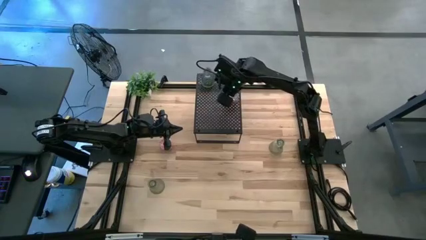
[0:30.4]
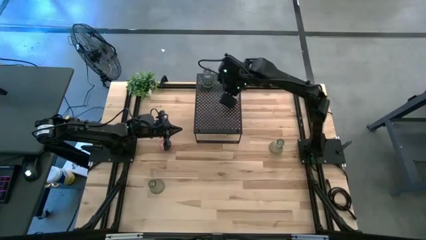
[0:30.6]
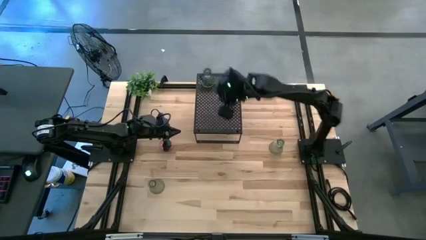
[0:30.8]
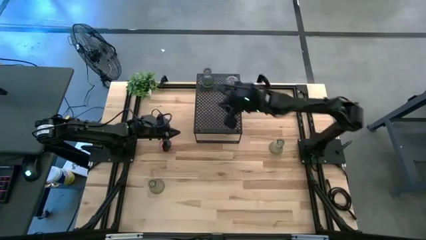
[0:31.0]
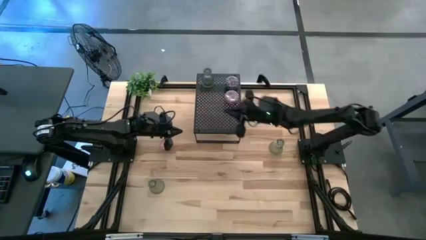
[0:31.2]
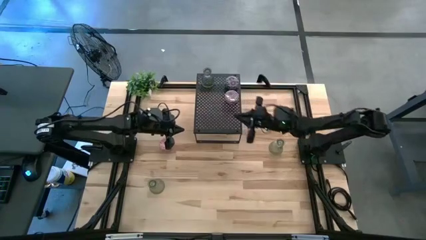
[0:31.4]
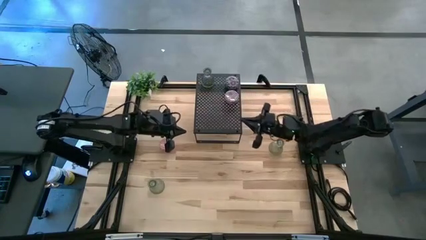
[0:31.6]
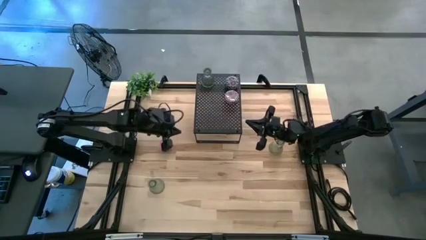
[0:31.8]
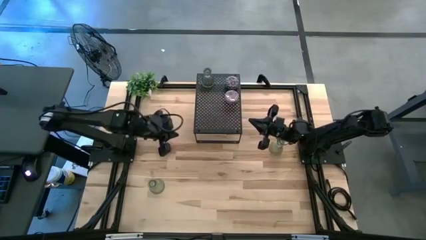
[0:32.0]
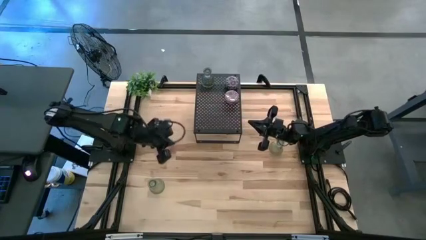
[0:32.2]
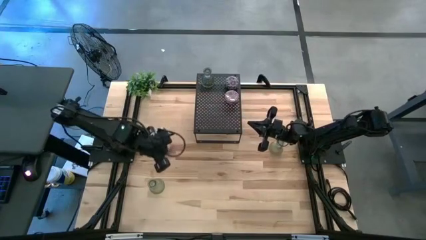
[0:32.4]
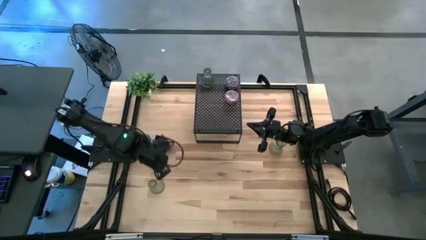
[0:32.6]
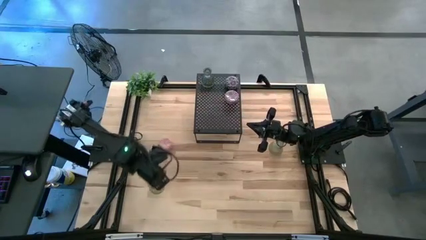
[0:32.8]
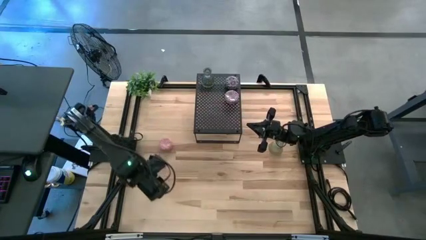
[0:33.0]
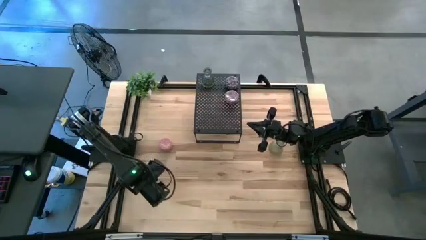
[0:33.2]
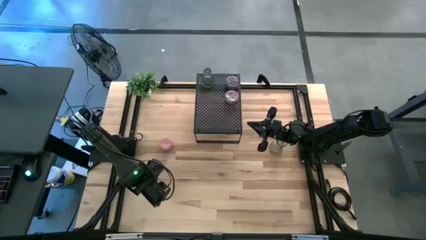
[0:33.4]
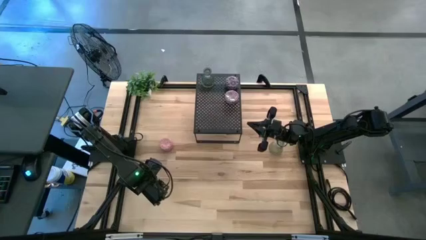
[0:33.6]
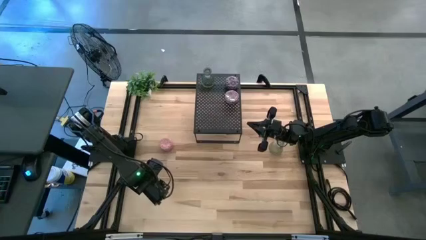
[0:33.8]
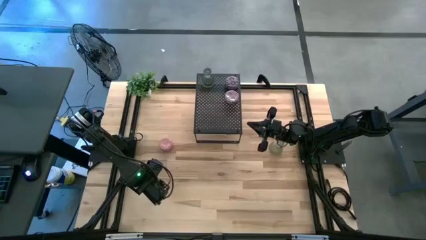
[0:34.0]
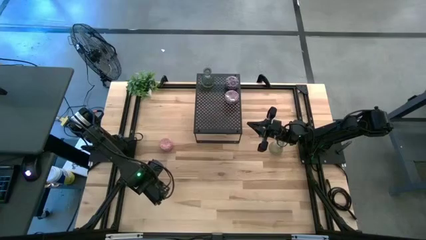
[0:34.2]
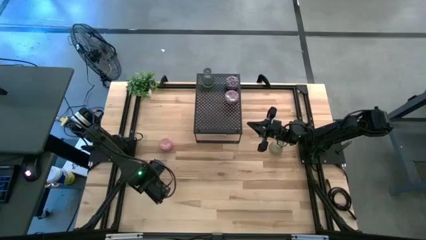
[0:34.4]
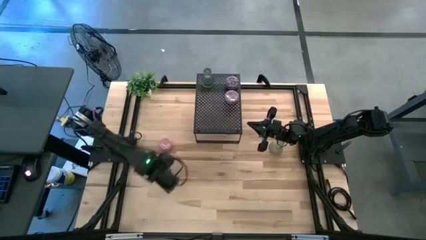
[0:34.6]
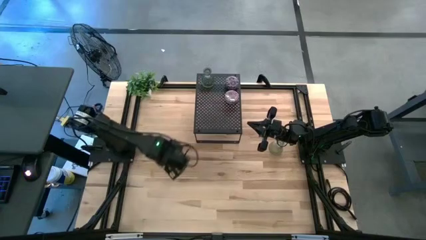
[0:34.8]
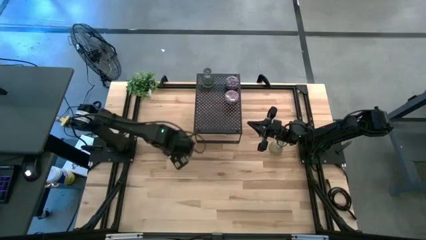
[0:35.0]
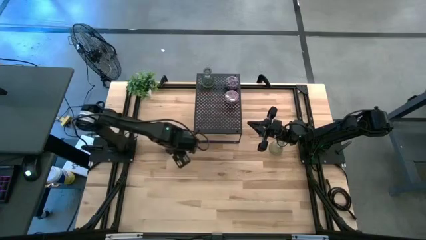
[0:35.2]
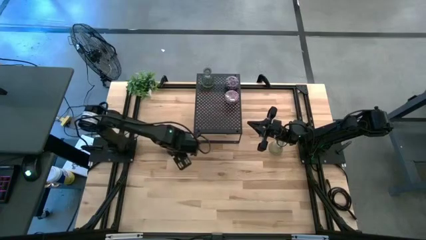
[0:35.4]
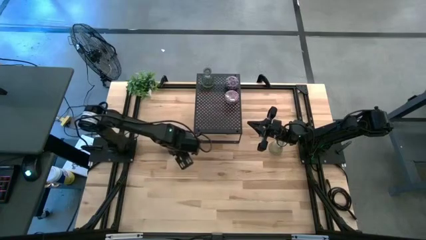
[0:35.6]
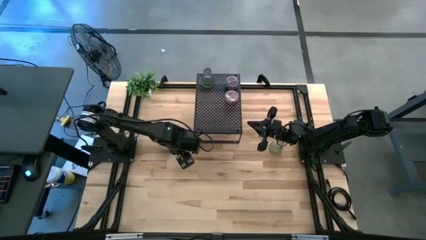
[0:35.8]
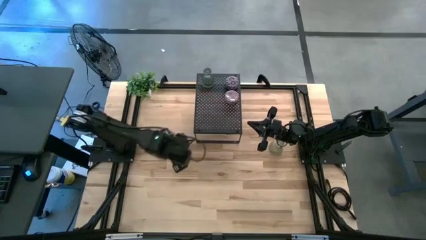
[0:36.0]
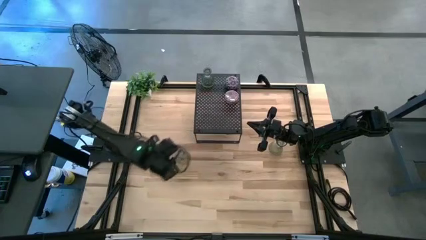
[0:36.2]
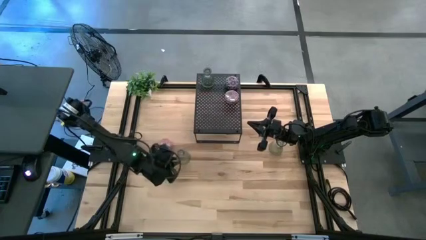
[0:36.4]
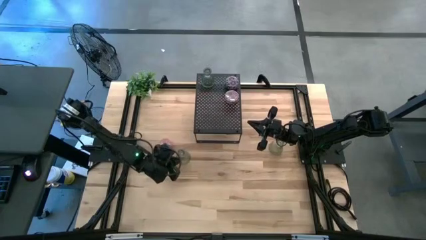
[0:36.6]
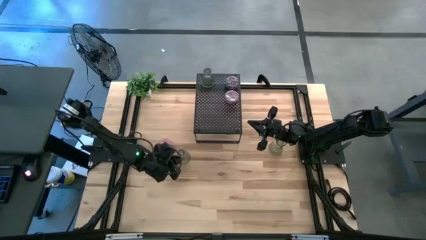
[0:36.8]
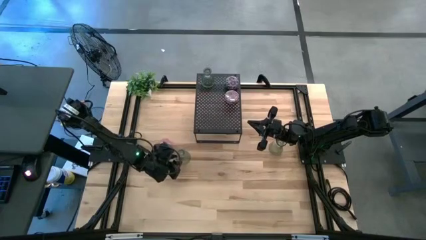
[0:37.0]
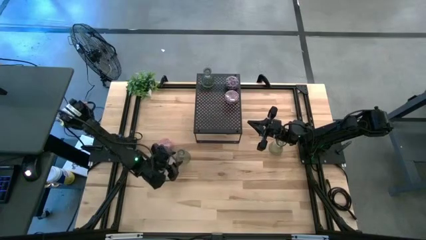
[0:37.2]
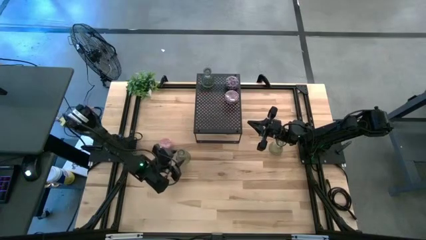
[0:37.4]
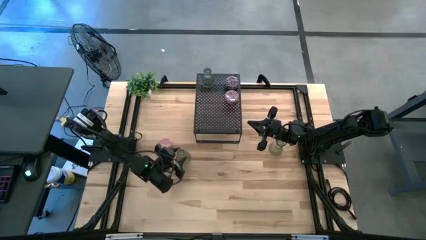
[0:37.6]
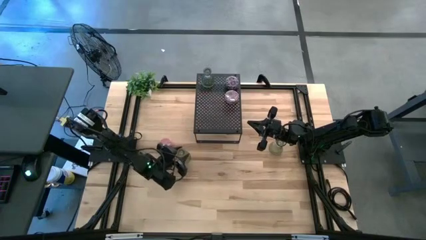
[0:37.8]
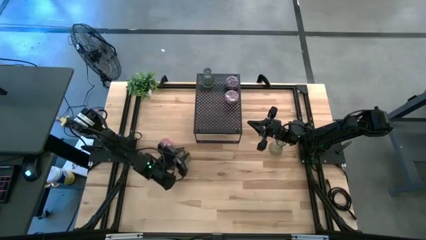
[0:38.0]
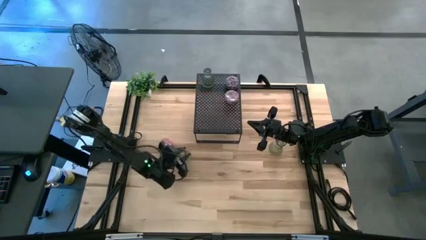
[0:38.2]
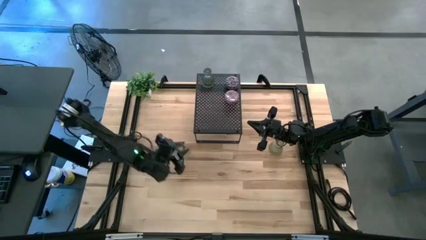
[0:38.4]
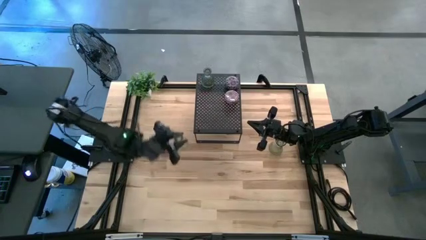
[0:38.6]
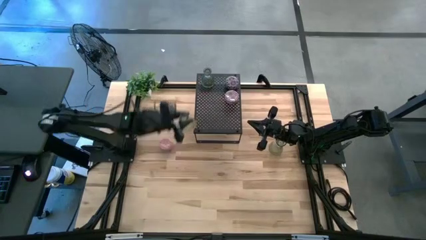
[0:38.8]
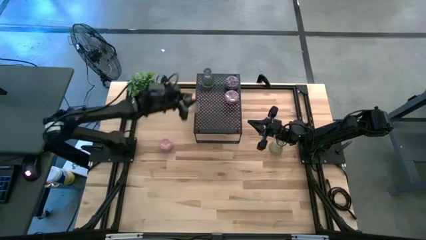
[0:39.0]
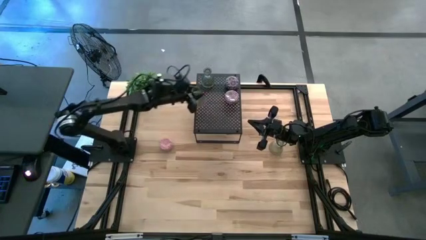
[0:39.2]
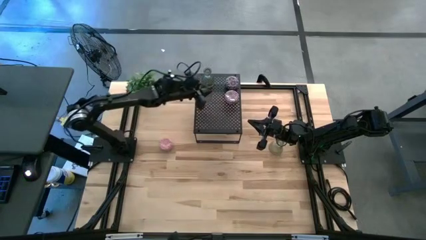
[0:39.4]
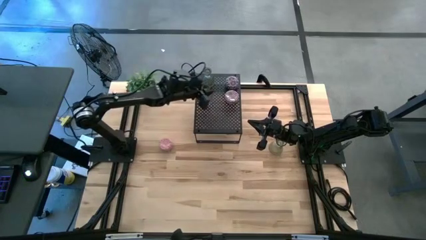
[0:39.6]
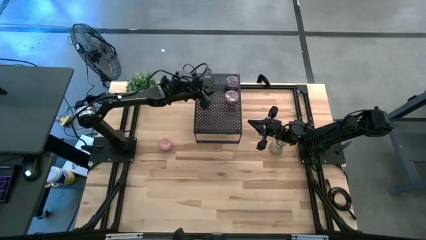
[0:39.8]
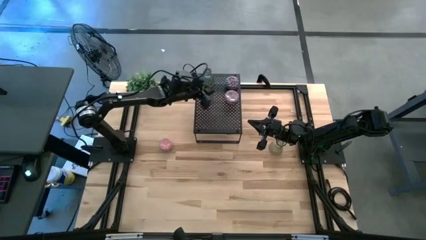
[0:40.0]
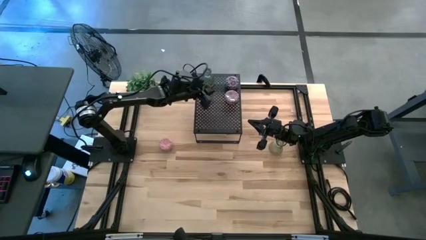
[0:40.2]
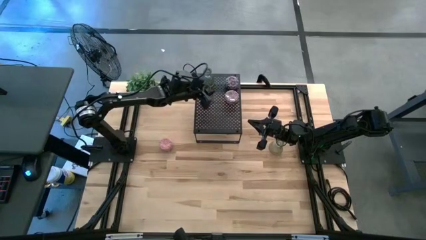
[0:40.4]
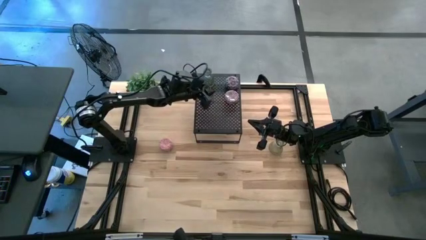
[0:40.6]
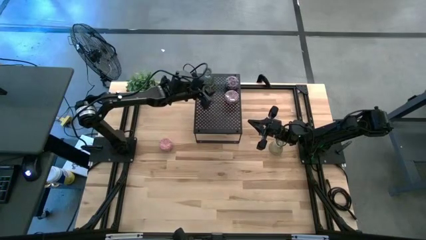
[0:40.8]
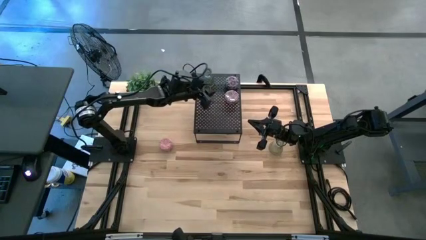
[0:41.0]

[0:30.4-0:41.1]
Task: Stock candles and vases on shelf
Put the left green vase on the shelf aligned with the other green vase
